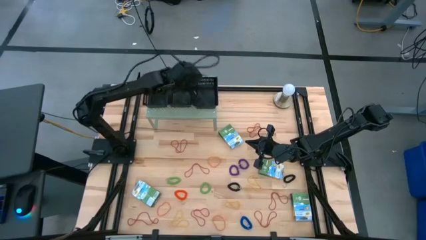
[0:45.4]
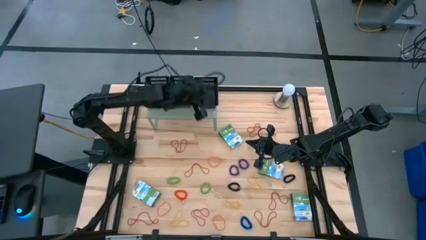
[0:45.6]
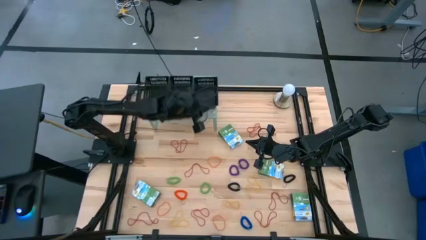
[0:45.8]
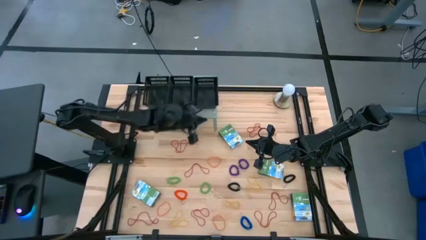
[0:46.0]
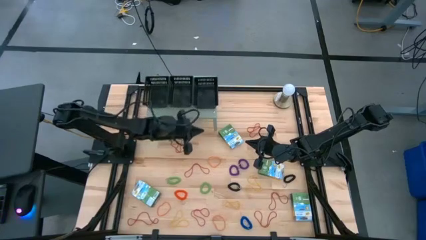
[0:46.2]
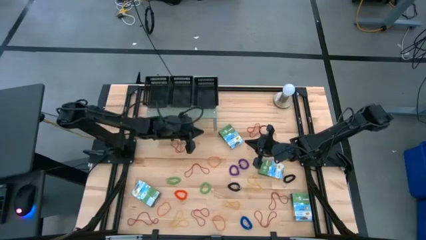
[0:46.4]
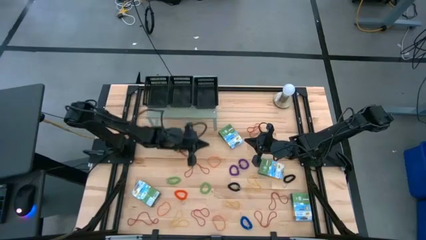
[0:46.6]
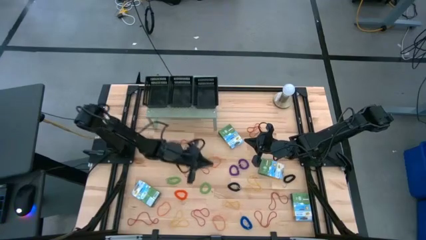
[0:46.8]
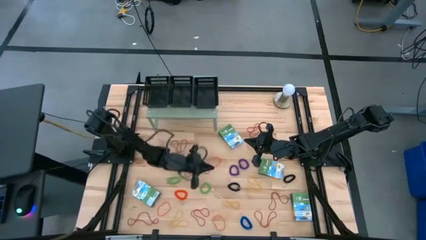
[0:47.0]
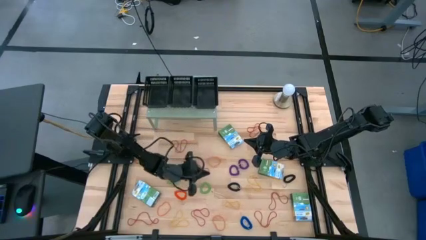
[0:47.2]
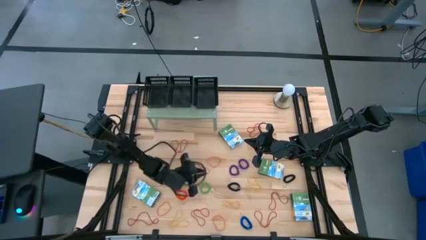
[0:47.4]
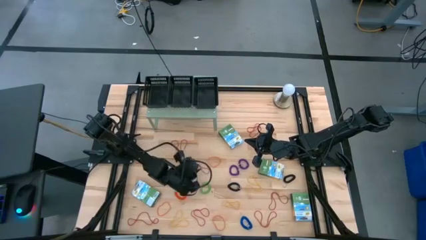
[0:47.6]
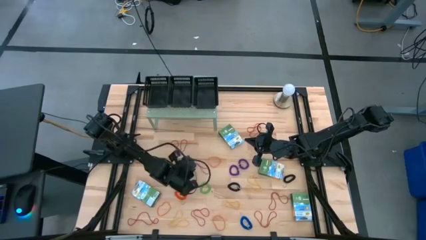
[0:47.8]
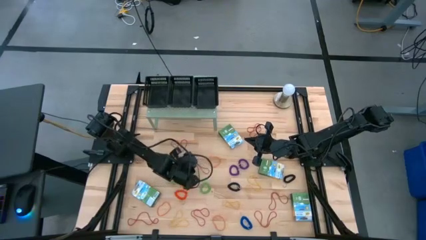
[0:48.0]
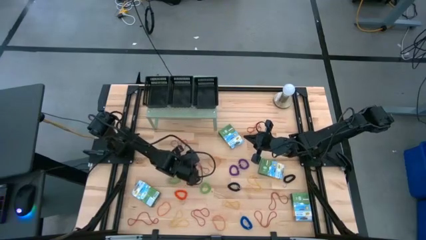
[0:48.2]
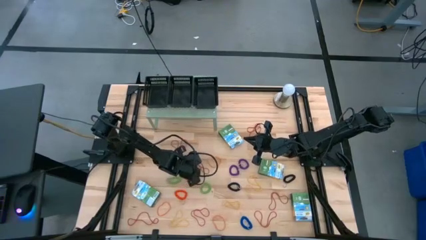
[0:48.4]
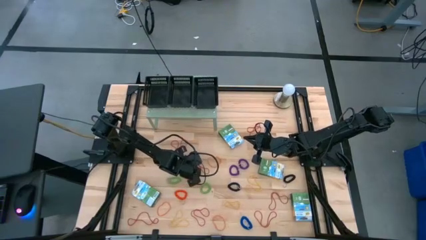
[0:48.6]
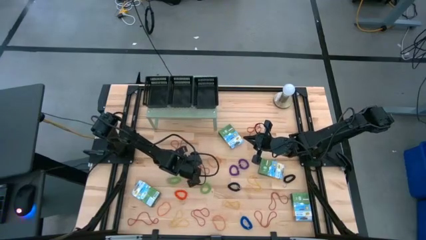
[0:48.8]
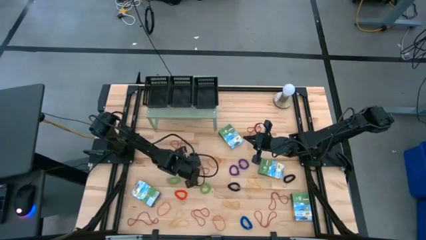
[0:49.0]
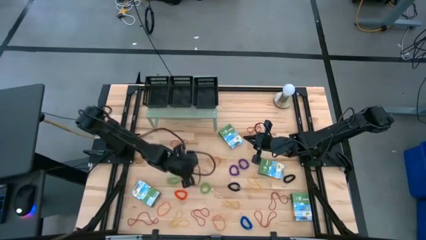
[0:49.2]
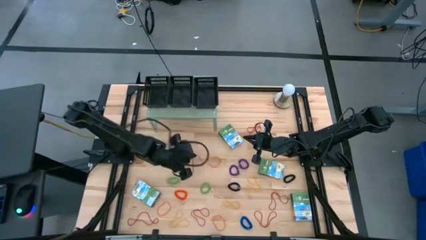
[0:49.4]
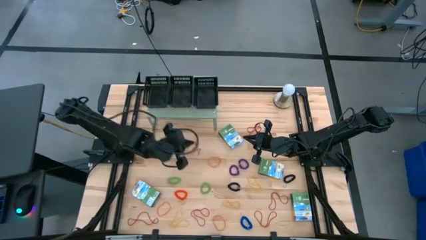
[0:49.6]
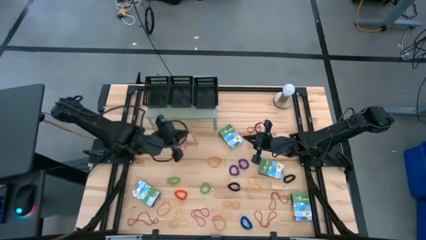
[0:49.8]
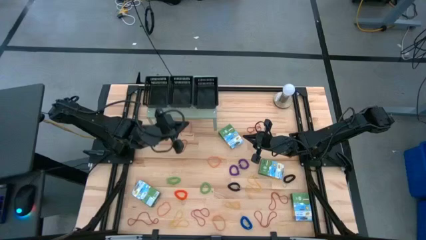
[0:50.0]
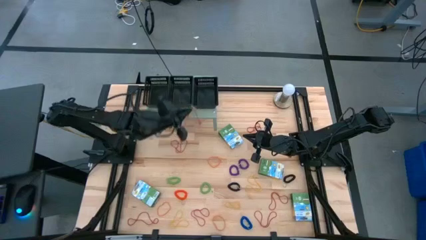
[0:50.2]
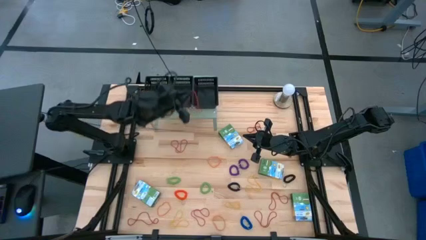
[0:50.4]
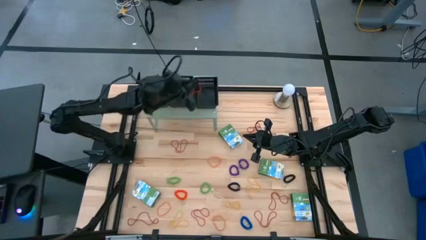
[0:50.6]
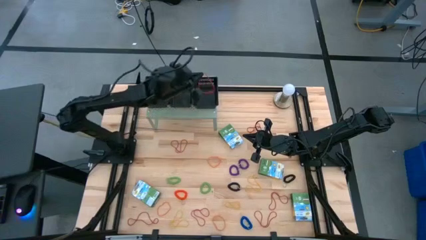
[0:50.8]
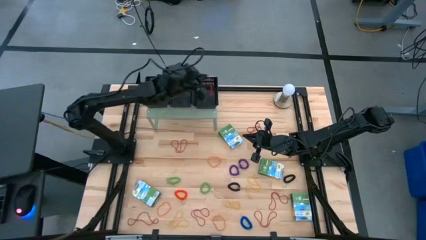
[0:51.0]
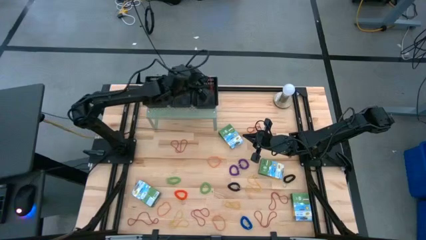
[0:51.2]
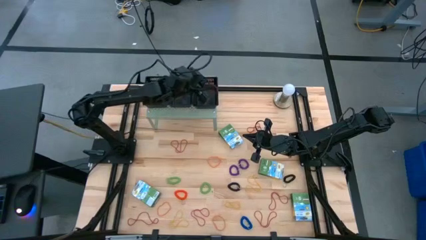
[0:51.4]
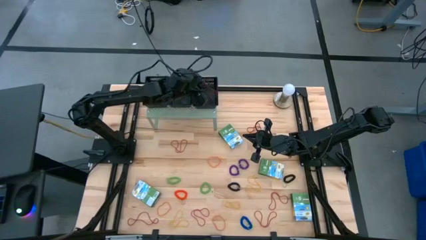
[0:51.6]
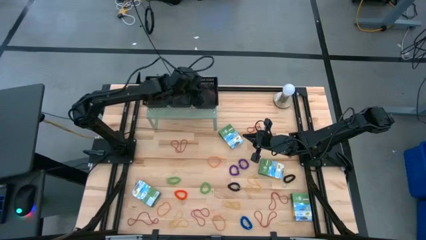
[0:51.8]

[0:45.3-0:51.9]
Task: Pick & Place Office Desk Supplies
Put the red rubber band into the right black bin on the shelf

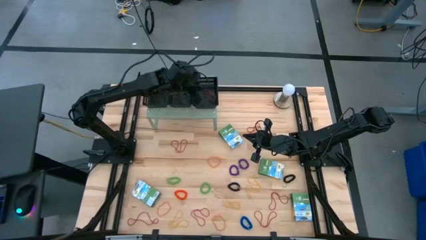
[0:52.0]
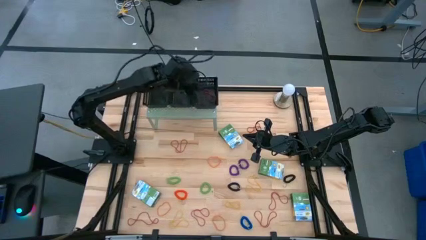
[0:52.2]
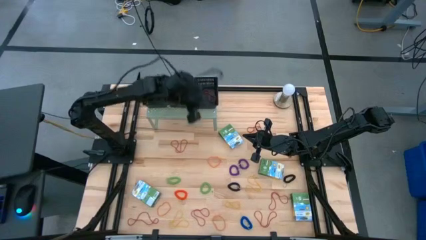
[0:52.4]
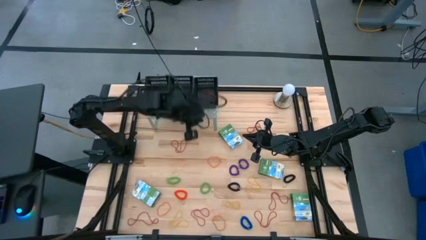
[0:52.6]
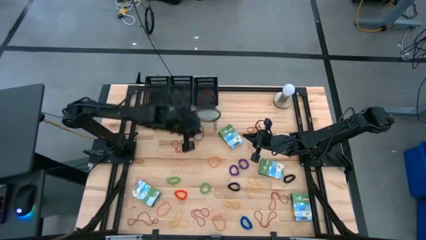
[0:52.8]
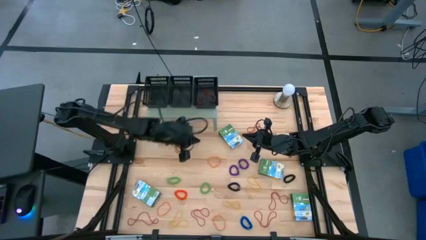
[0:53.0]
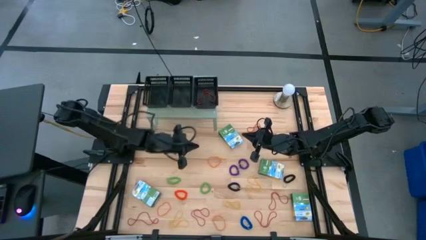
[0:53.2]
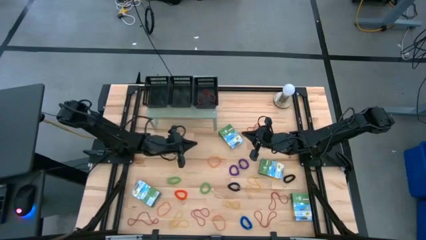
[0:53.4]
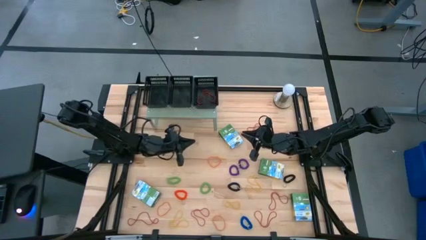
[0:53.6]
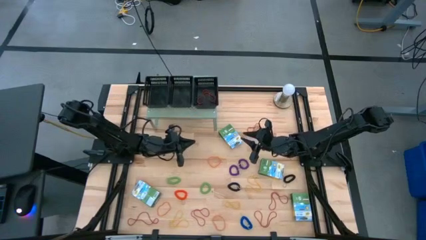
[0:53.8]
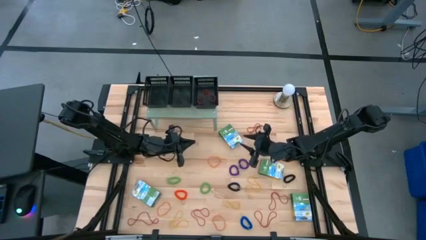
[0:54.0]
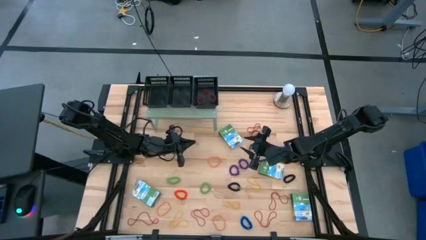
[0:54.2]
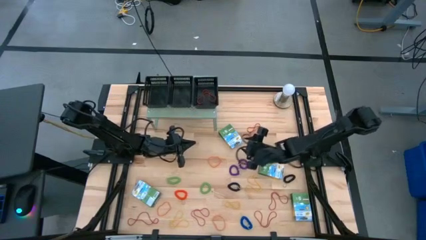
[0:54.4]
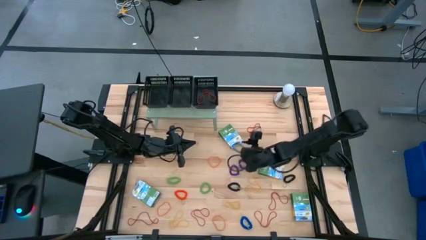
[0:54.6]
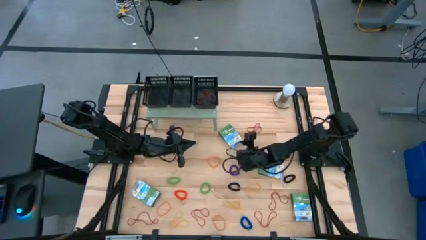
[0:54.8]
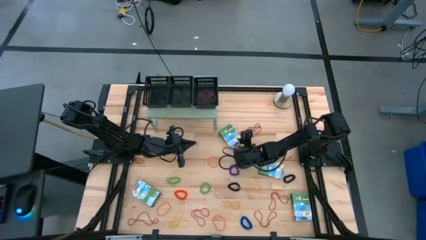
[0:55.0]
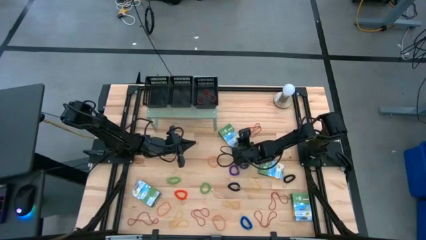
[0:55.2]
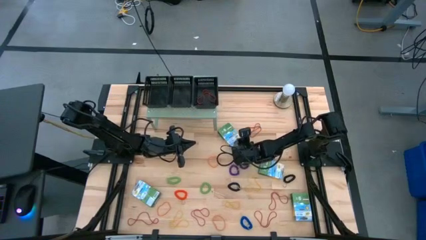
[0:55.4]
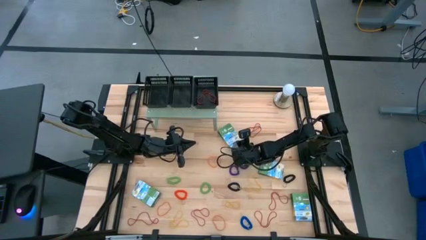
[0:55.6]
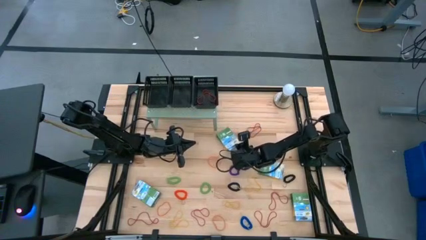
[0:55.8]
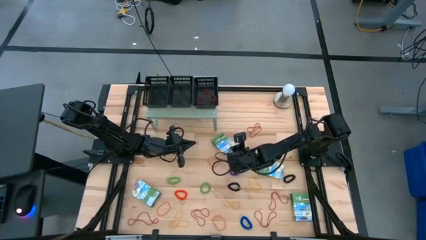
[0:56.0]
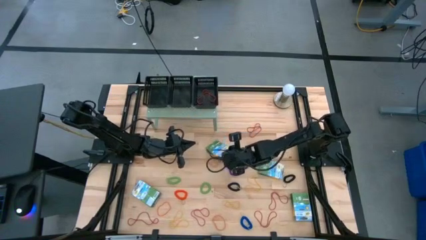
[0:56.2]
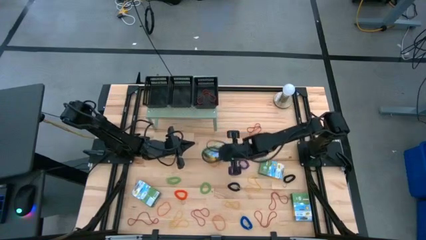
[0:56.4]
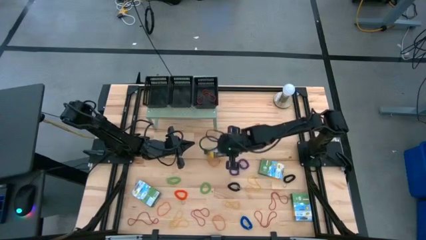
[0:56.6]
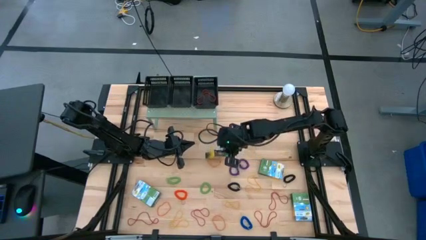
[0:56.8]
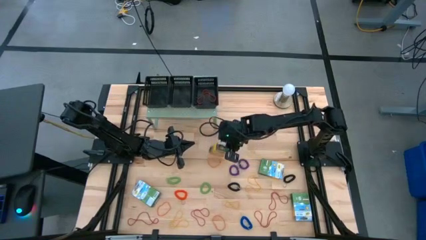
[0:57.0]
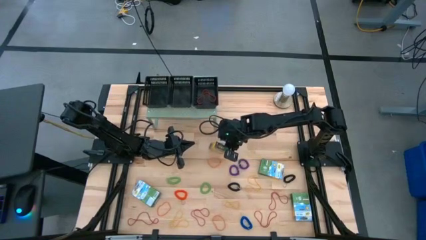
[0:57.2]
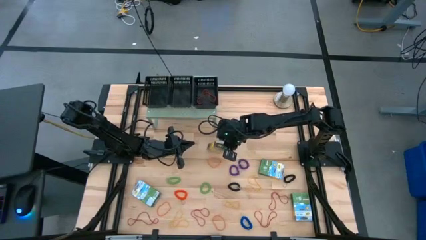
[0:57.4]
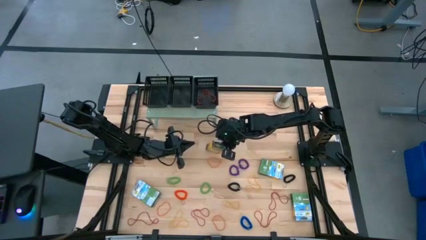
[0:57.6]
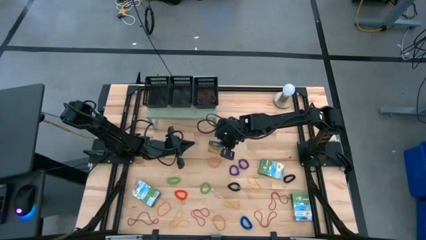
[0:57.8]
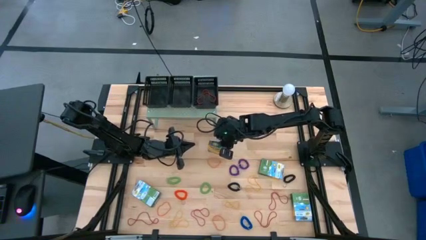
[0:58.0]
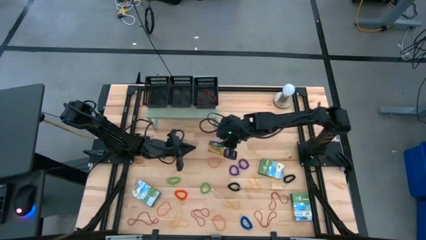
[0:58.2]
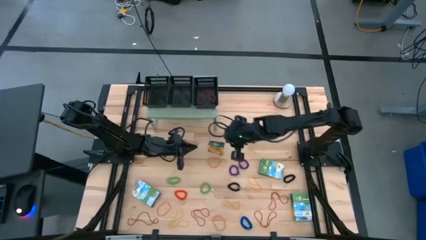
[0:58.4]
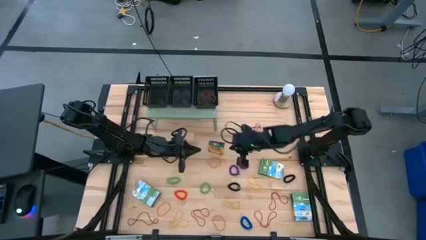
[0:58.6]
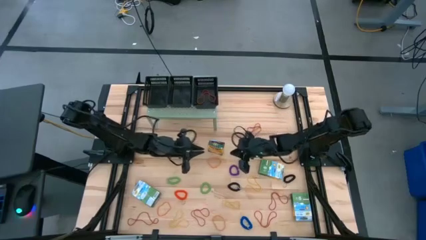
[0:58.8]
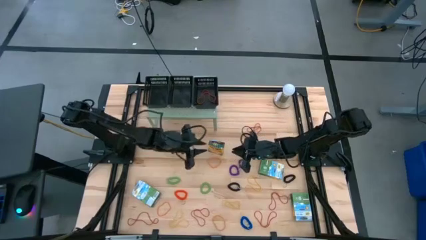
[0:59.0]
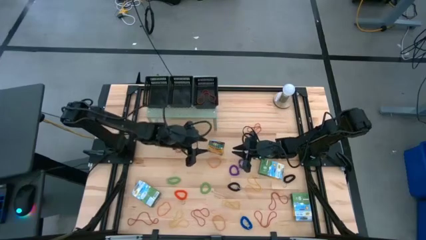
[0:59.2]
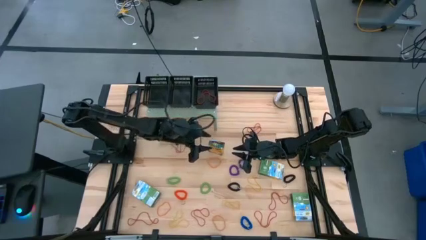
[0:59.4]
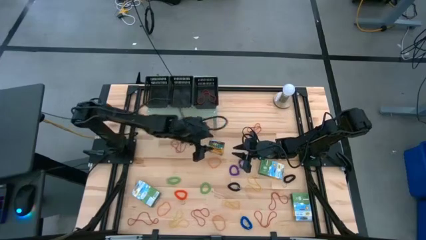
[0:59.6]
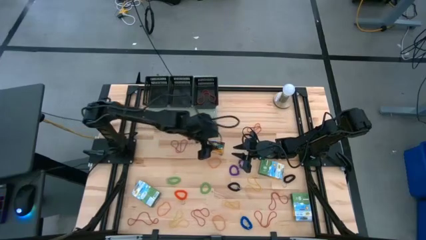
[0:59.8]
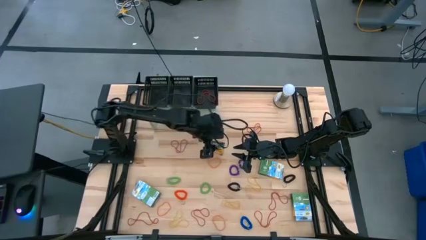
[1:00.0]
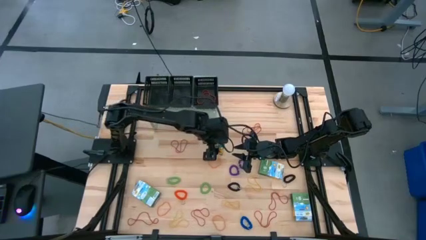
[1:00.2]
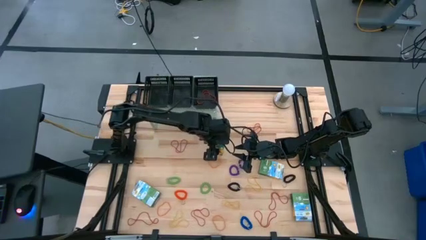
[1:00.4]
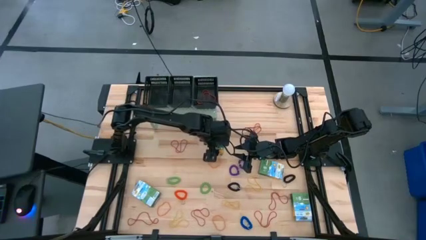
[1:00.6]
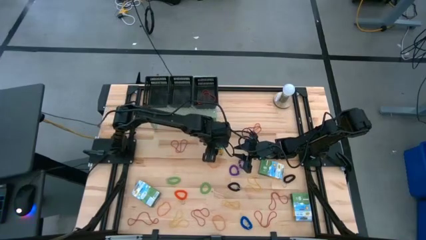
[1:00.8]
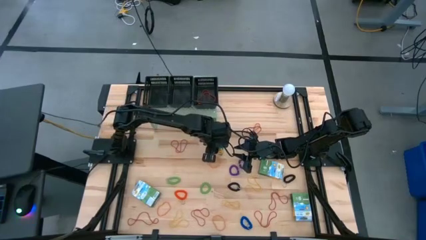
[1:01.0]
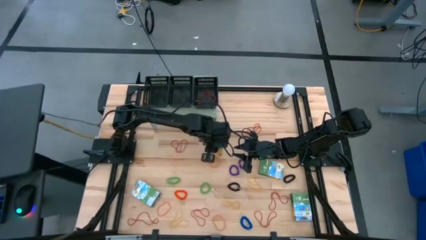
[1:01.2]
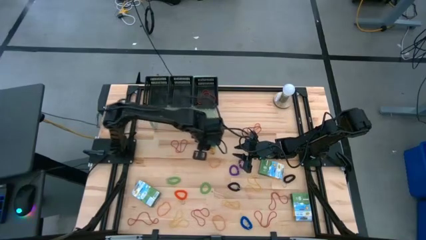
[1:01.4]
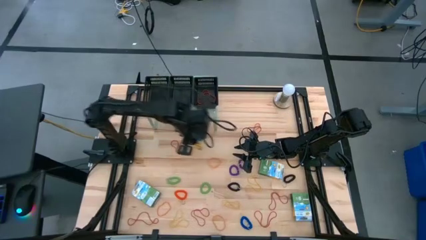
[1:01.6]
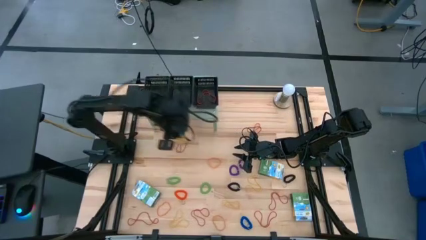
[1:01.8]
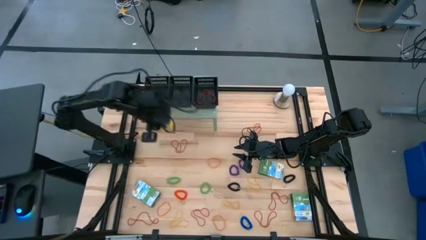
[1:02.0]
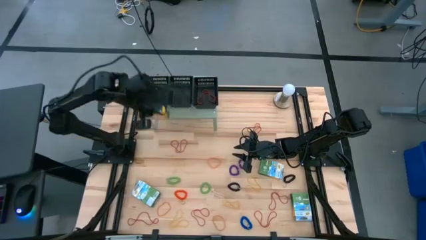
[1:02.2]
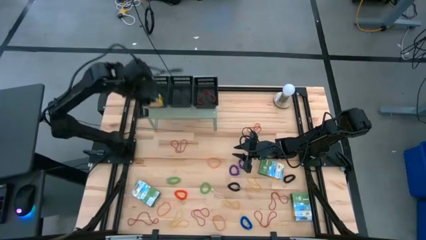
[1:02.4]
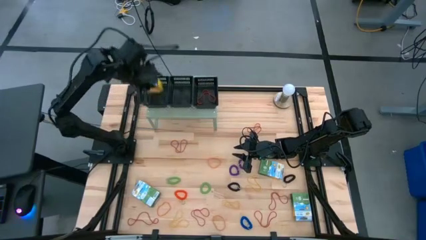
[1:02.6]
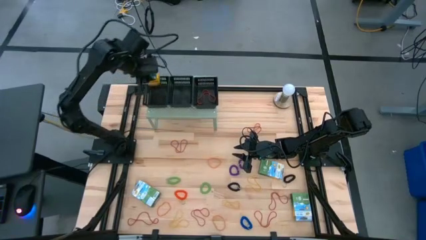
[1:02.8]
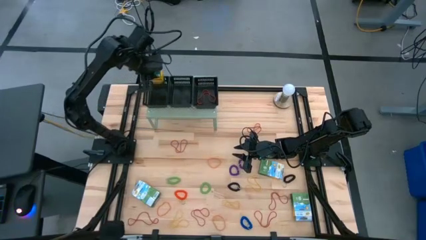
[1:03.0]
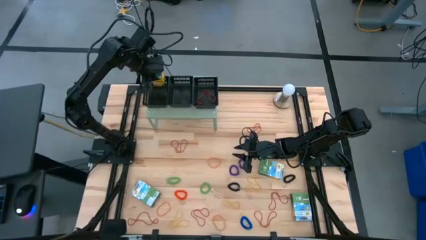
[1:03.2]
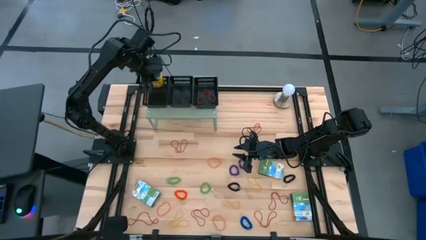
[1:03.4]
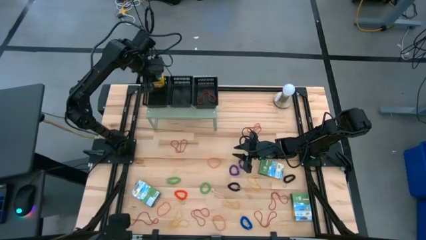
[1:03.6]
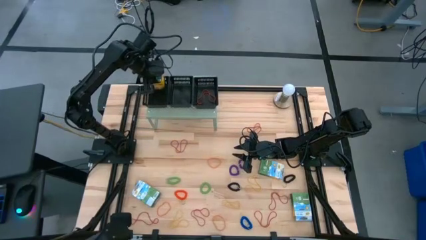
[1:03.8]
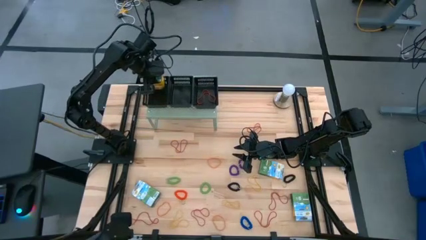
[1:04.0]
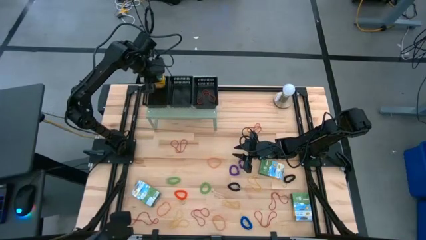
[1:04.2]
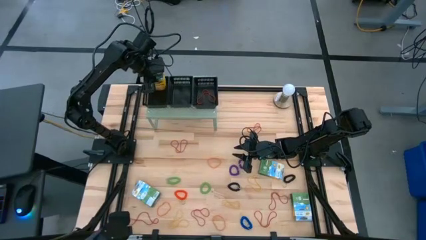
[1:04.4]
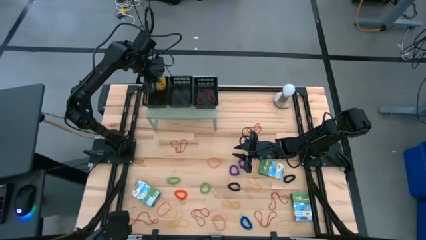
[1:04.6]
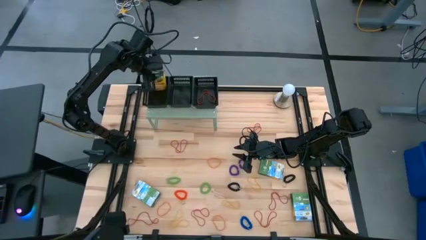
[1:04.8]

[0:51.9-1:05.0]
Put the crayon box into the left black bin on the shelf
